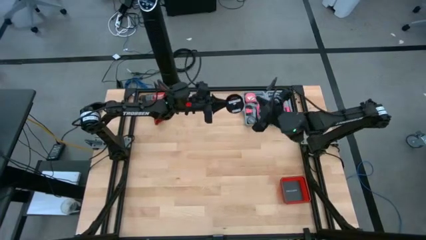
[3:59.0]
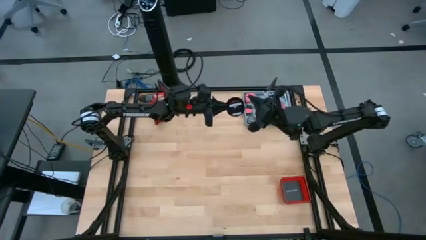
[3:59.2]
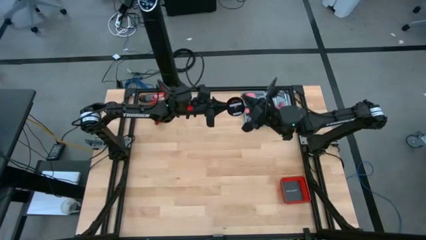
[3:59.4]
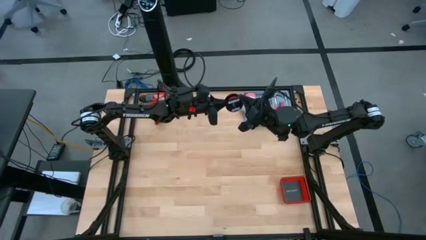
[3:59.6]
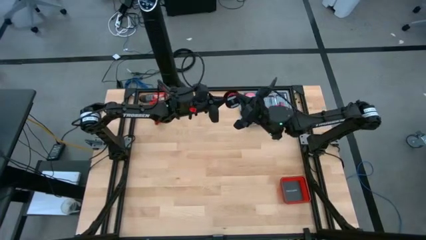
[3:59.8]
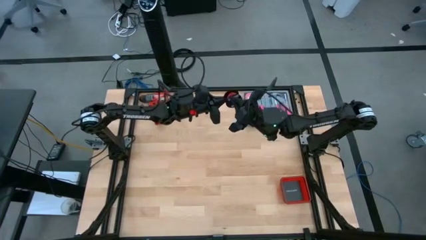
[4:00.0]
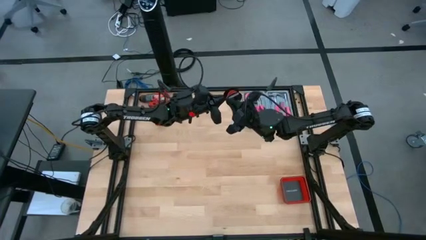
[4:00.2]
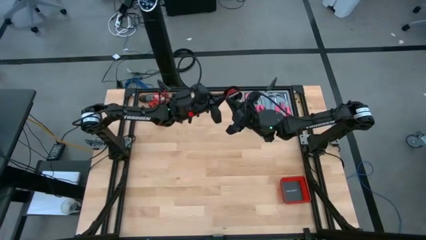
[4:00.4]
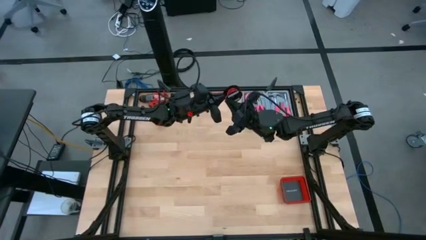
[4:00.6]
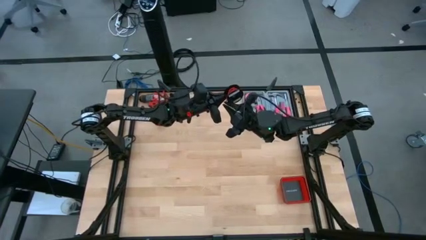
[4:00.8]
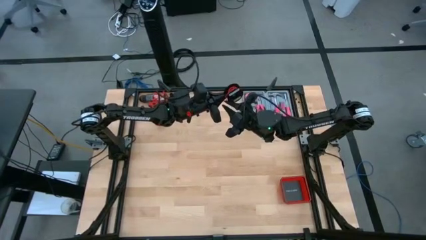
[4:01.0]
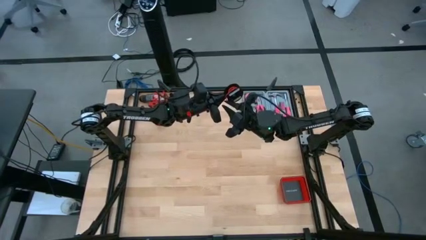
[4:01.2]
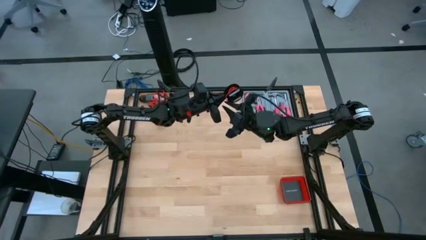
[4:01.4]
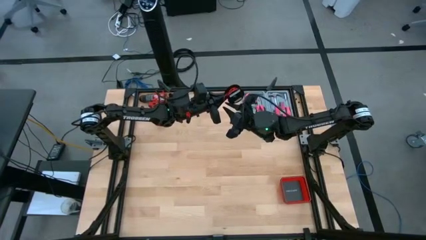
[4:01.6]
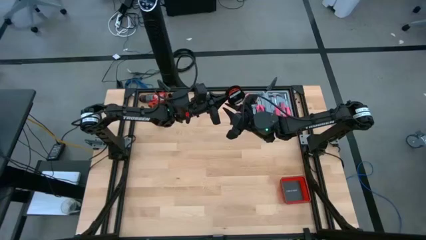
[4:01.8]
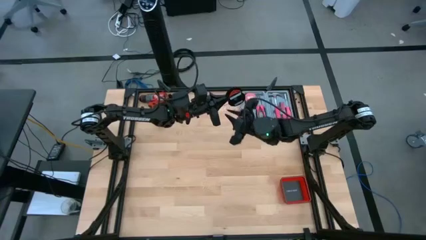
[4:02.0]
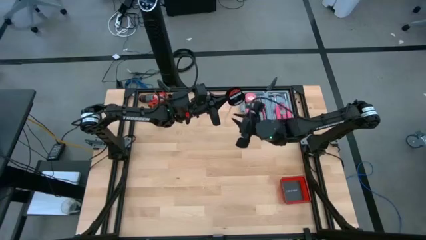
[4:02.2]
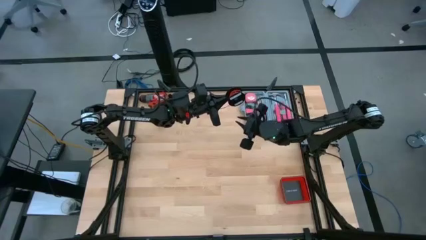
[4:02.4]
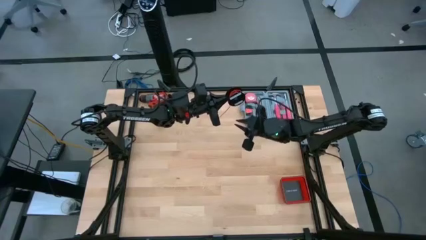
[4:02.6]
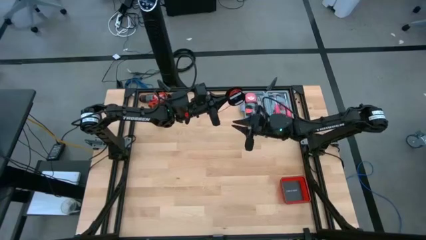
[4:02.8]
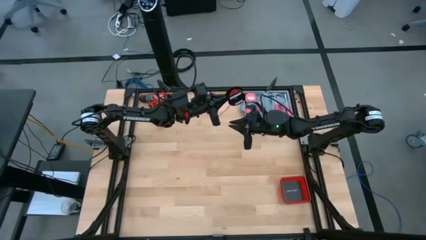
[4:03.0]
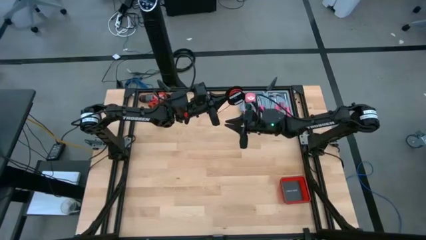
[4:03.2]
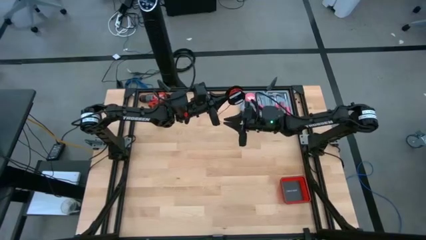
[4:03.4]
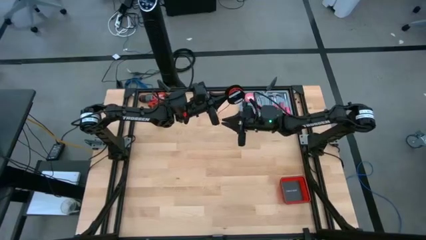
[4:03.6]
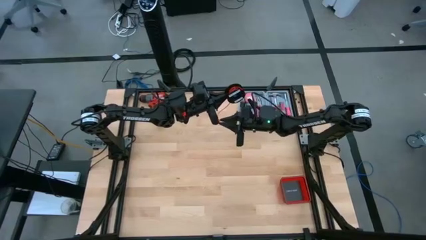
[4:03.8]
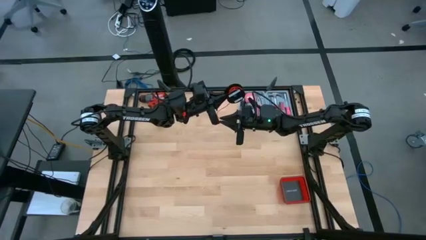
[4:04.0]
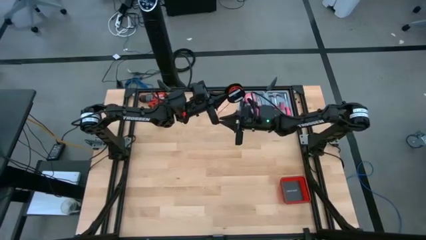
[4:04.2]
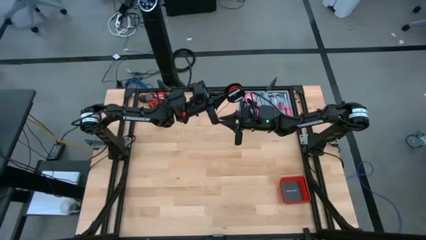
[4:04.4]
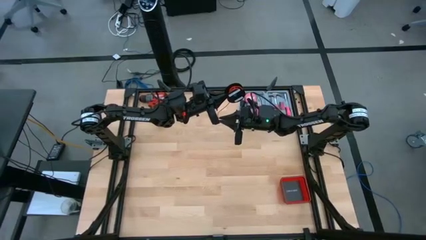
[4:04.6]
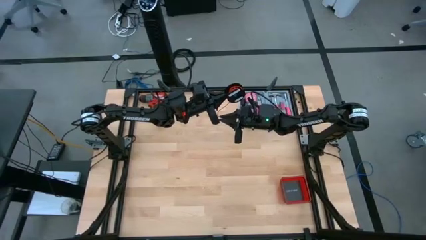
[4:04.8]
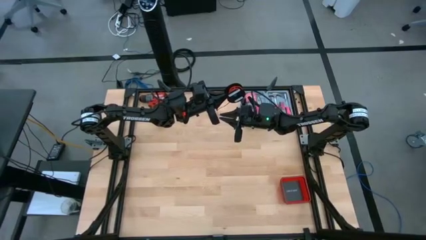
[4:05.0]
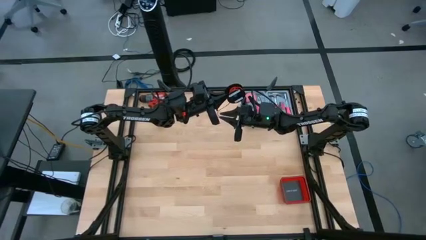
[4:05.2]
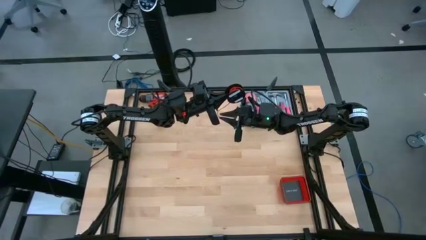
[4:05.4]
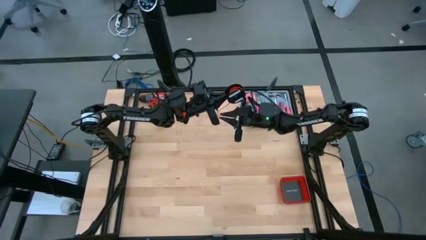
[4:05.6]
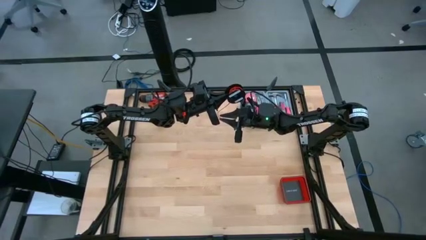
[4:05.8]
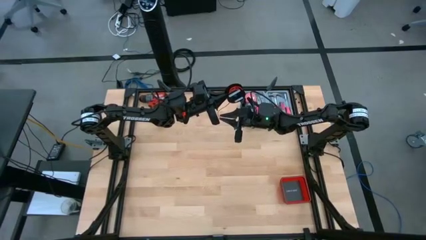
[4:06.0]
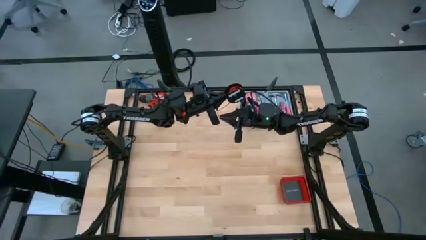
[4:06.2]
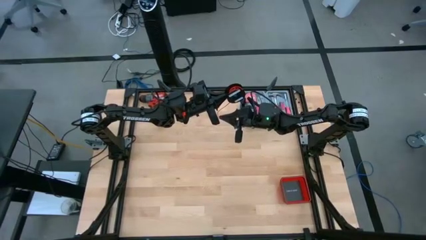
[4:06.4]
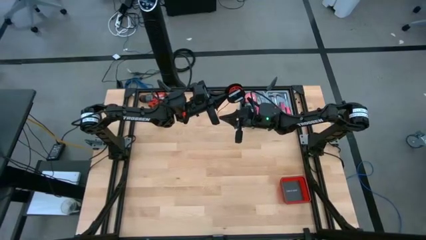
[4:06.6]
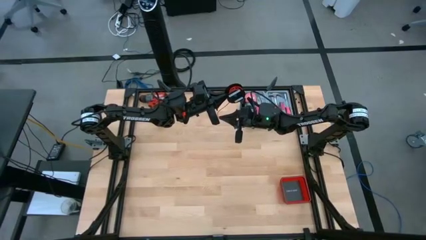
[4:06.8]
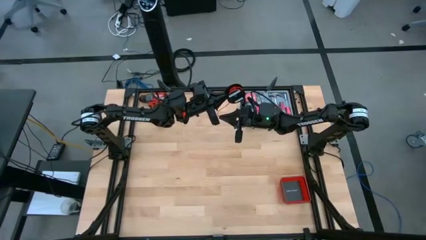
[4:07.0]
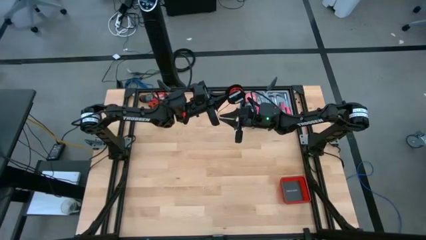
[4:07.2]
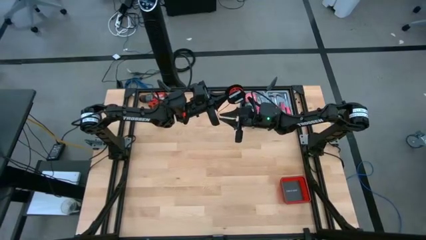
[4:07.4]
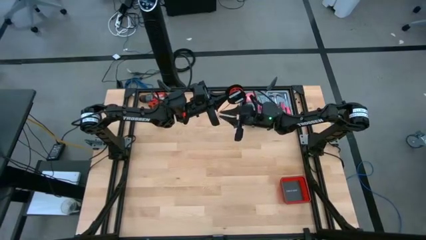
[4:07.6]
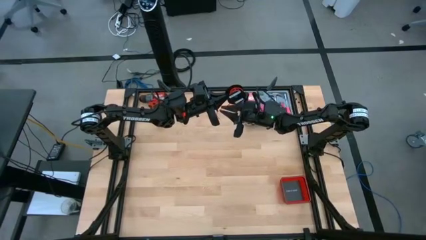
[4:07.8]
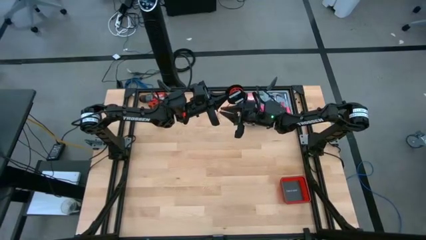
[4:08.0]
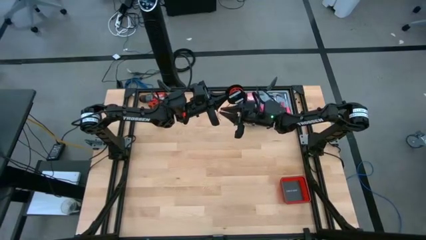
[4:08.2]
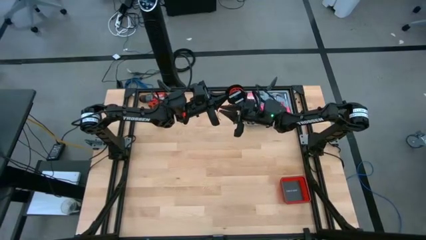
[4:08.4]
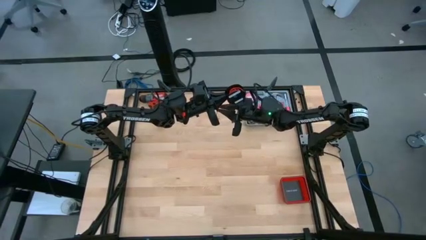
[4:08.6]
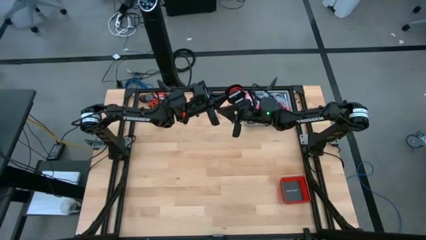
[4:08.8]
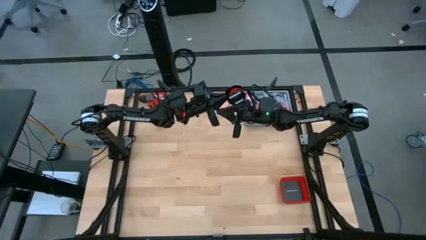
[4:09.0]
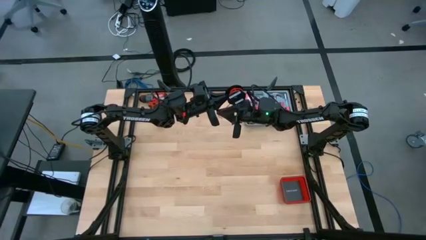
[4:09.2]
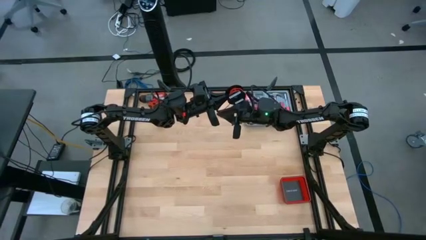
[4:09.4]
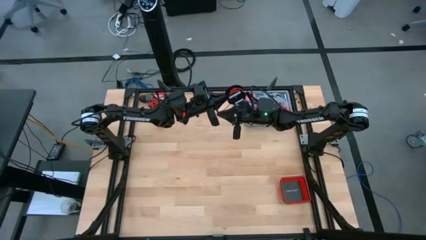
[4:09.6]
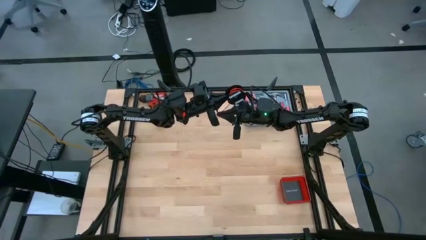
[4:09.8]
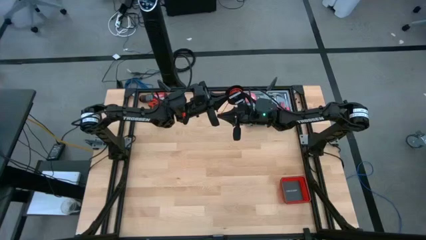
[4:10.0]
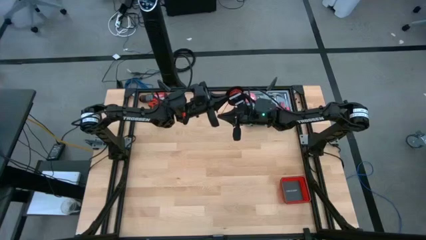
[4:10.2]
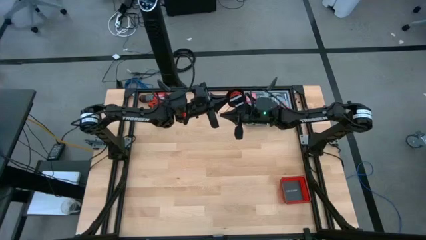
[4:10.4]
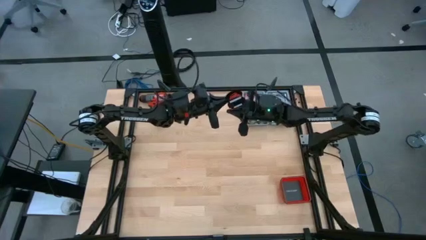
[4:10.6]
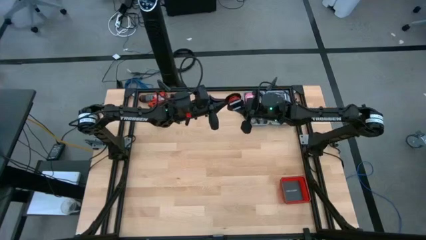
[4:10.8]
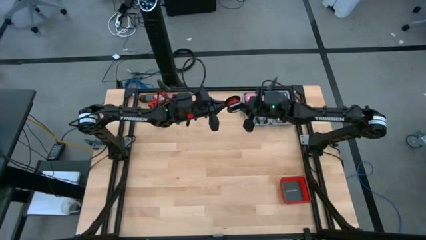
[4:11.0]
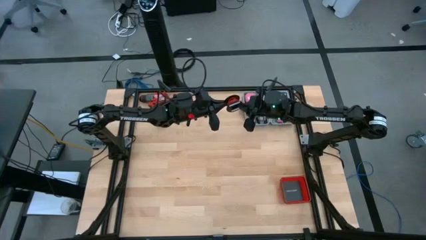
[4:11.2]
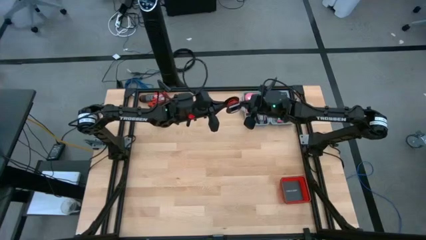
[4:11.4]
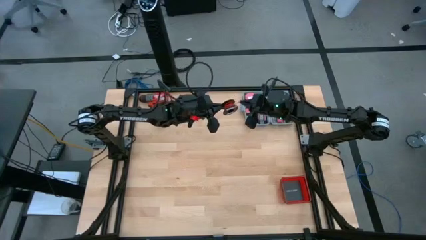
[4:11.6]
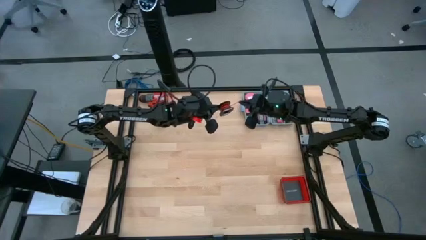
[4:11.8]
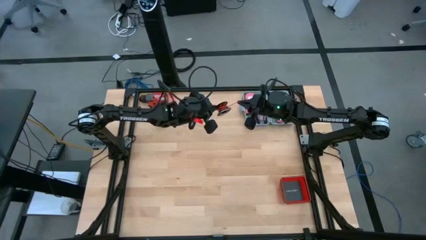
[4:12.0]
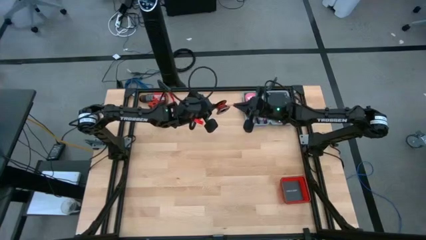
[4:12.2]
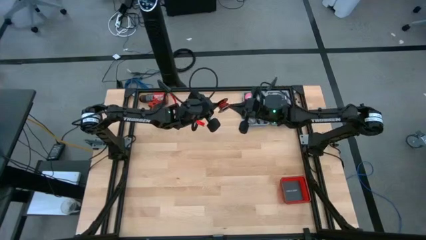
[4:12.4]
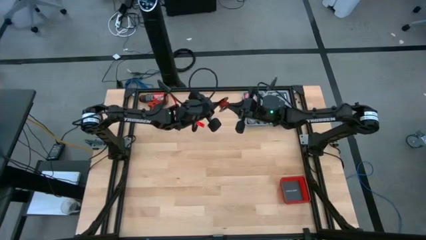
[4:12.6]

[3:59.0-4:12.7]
Task: Coil cords
Coil the red wire on the black spool

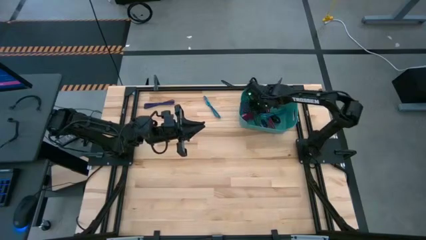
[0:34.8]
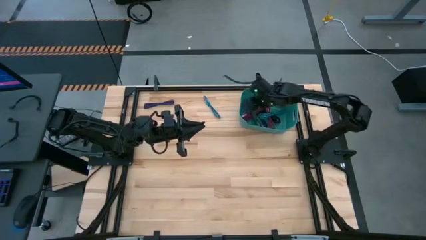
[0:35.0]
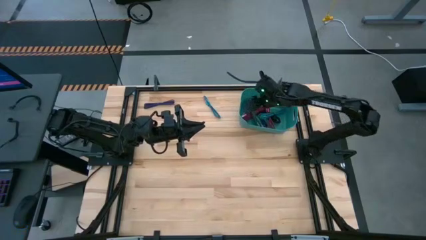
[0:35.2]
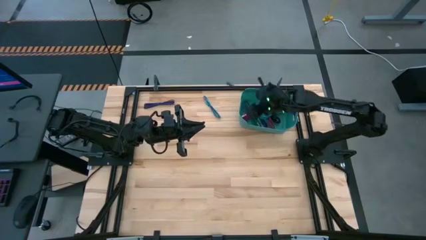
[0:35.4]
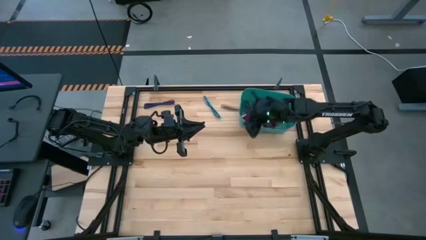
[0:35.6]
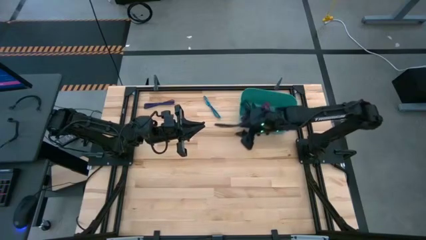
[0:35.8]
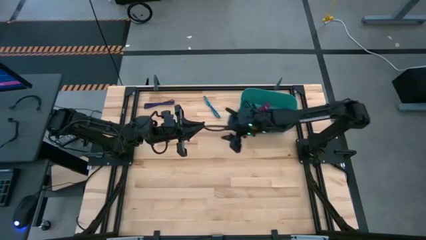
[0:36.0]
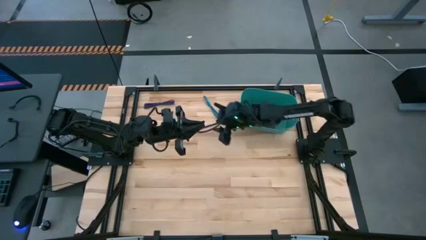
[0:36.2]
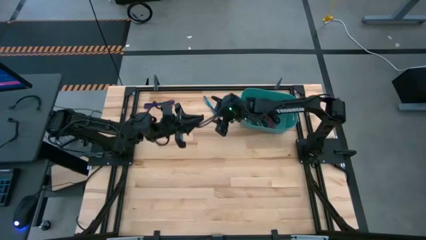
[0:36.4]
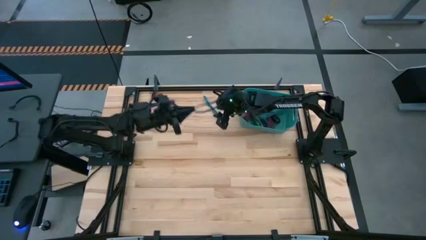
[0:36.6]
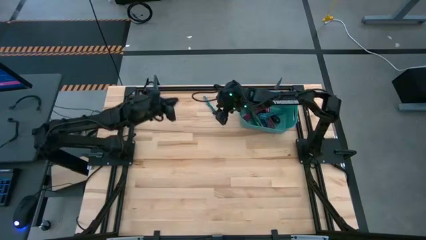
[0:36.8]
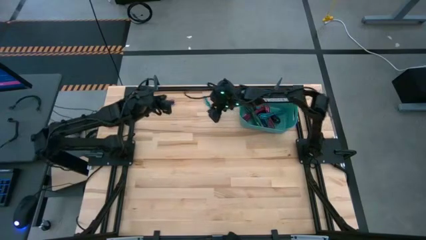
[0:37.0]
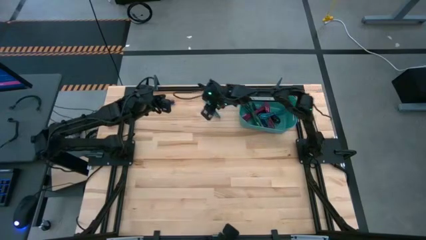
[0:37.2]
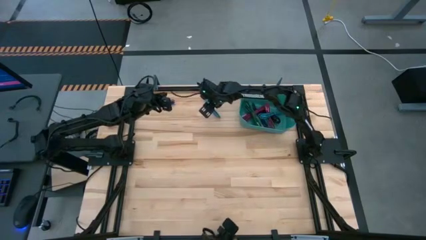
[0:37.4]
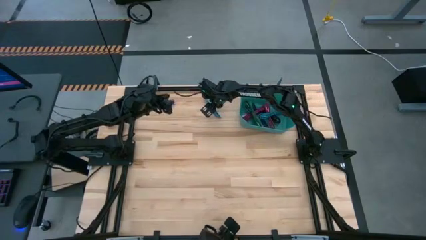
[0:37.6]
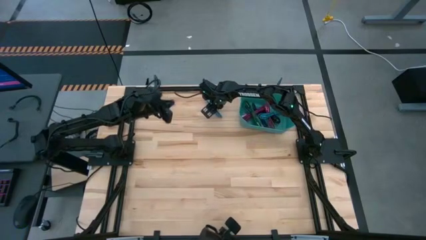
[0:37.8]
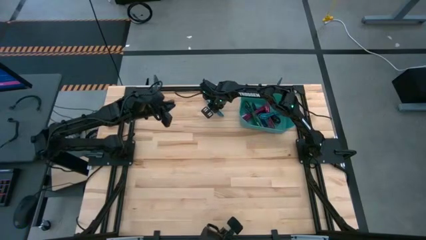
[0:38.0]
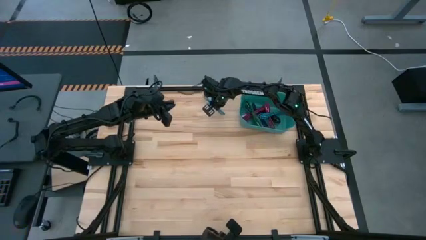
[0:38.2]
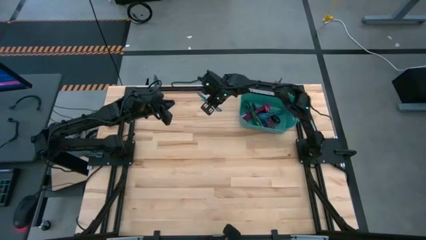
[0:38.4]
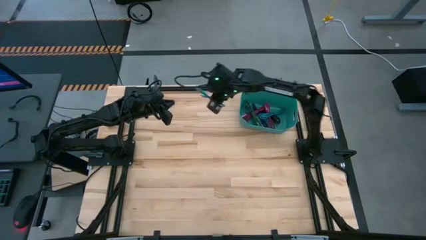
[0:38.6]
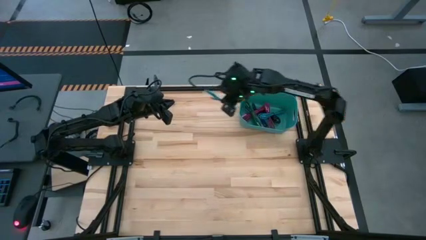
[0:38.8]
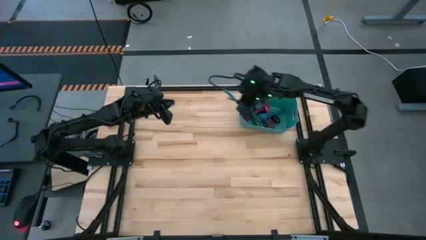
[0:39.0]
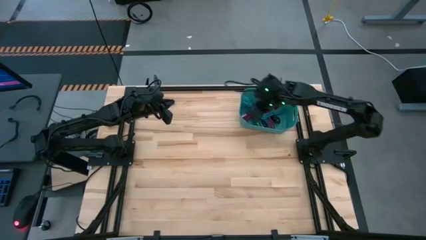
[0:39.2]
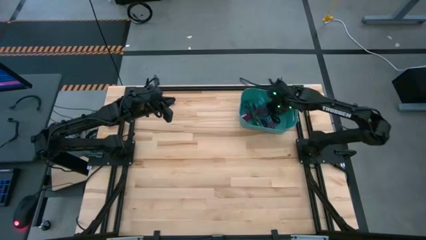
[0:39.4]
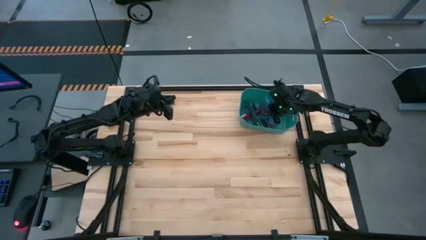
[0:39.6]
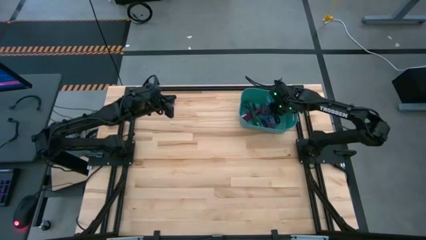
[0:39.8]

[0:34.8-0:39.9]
Task: Pick and place USB-C Cables
Put the blue charger cable into the light blue bin
